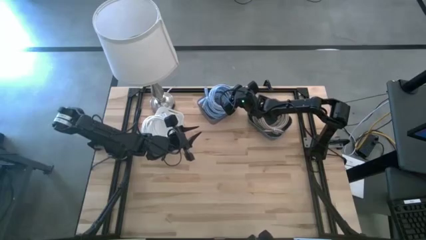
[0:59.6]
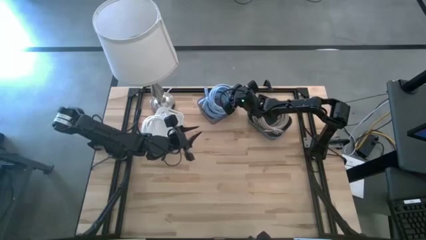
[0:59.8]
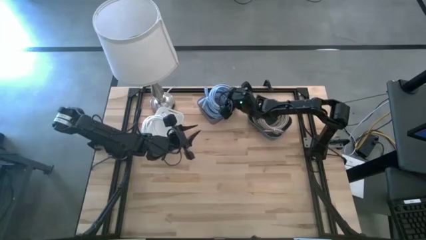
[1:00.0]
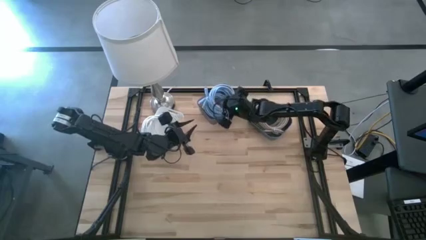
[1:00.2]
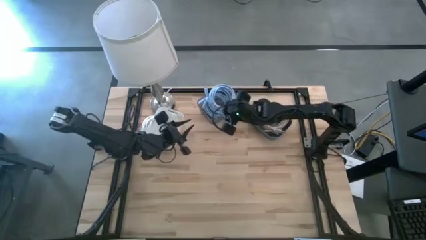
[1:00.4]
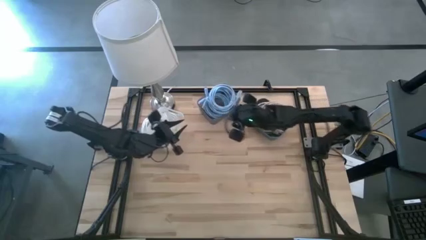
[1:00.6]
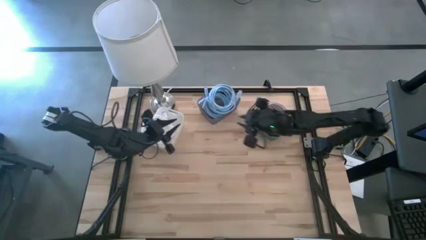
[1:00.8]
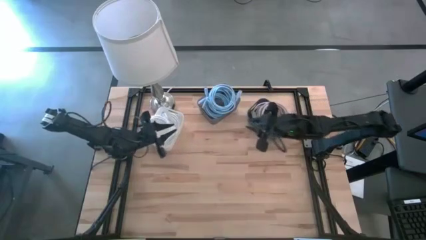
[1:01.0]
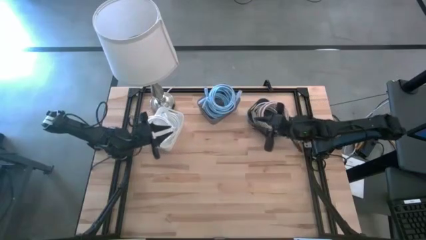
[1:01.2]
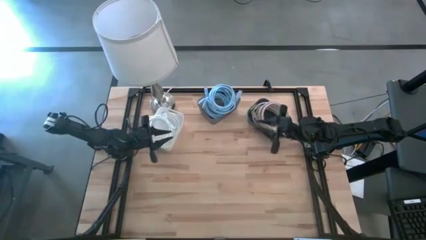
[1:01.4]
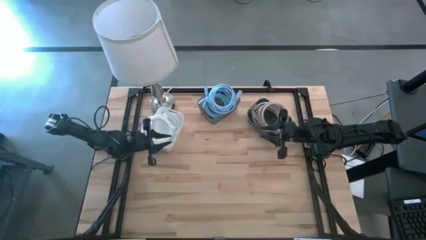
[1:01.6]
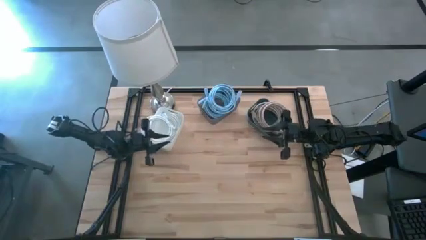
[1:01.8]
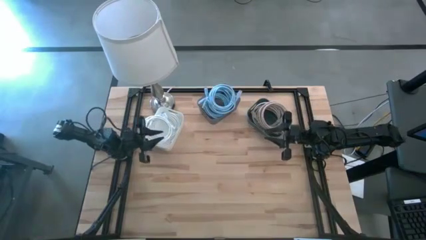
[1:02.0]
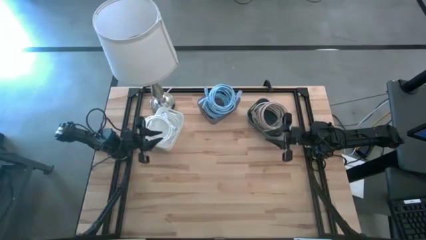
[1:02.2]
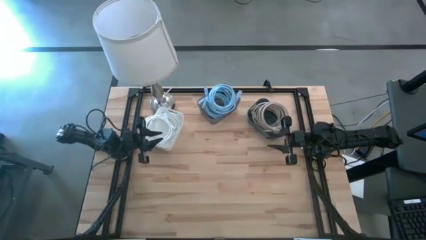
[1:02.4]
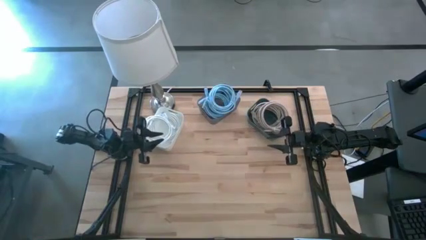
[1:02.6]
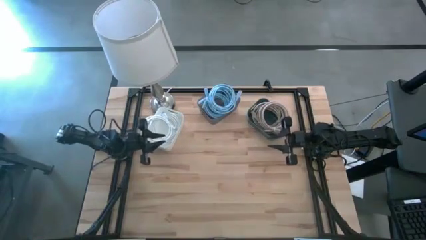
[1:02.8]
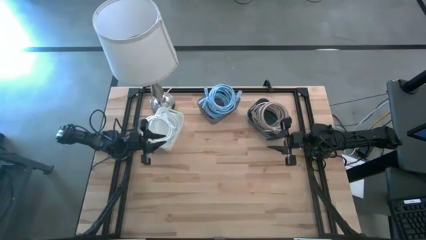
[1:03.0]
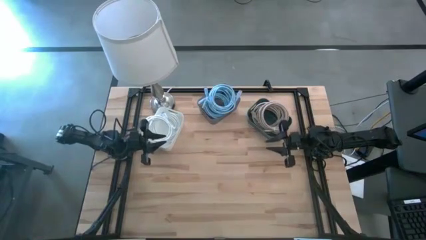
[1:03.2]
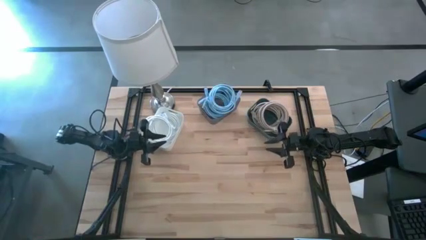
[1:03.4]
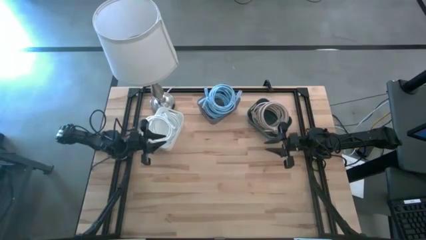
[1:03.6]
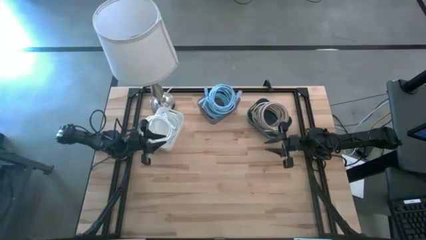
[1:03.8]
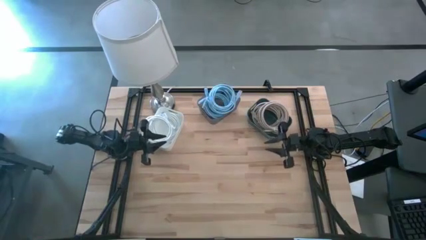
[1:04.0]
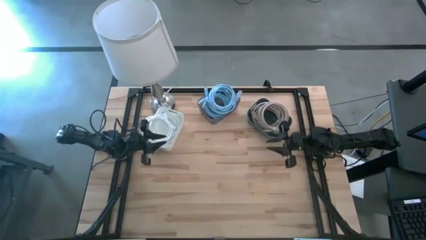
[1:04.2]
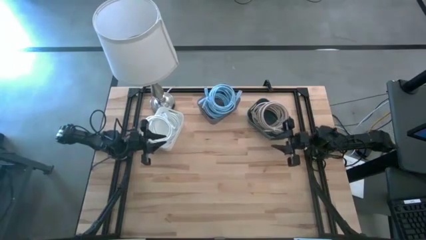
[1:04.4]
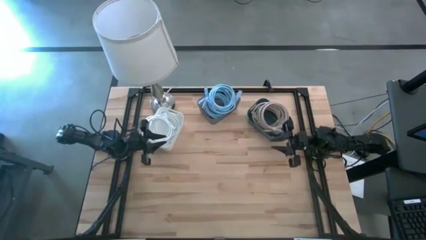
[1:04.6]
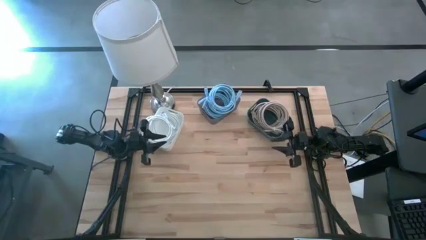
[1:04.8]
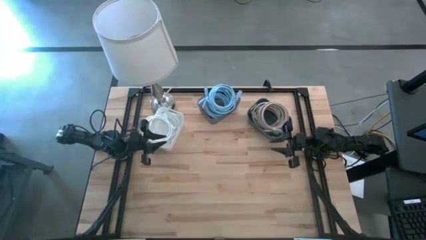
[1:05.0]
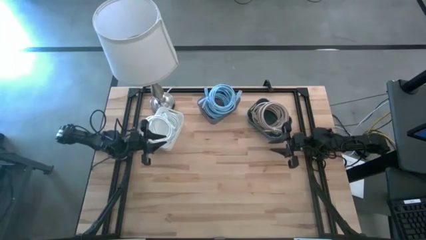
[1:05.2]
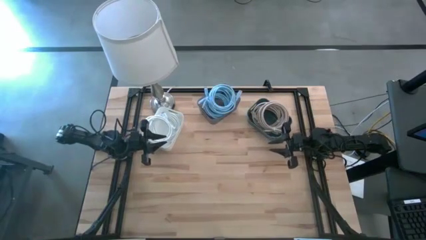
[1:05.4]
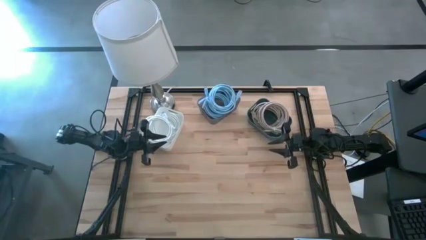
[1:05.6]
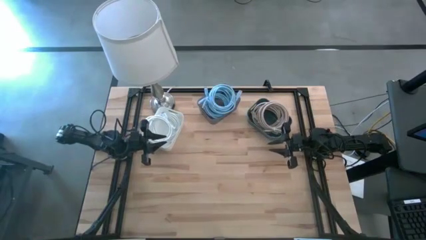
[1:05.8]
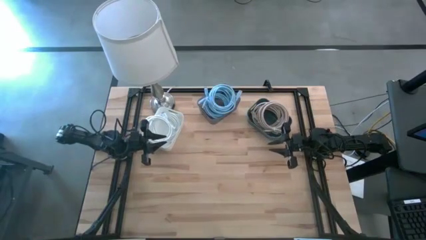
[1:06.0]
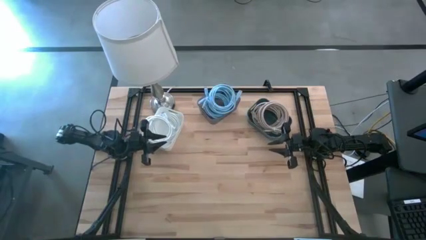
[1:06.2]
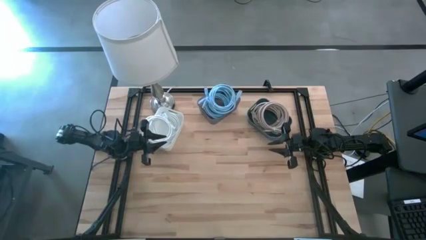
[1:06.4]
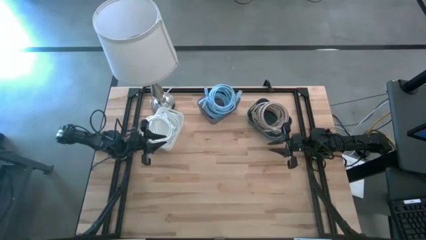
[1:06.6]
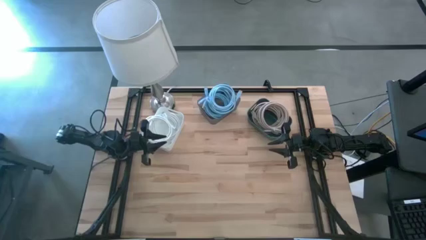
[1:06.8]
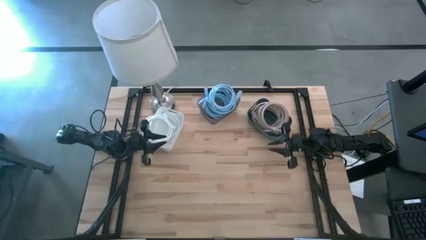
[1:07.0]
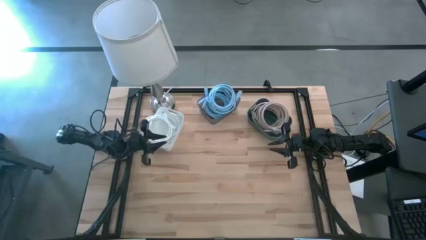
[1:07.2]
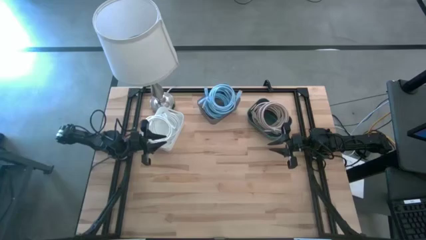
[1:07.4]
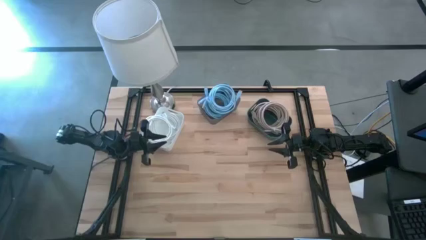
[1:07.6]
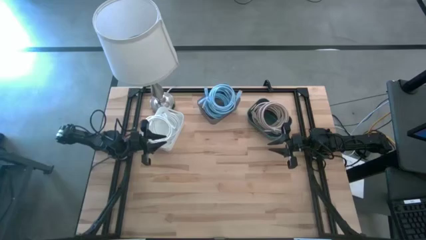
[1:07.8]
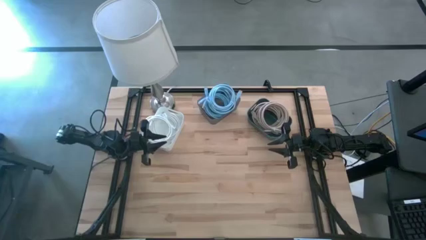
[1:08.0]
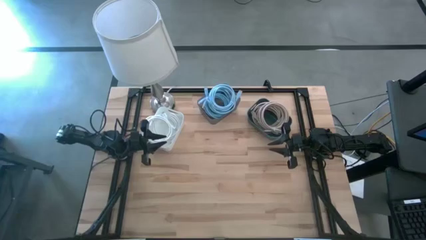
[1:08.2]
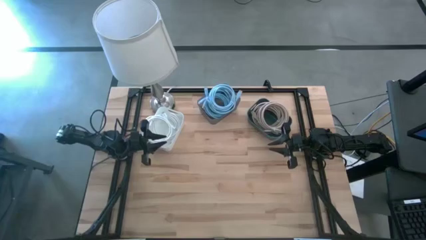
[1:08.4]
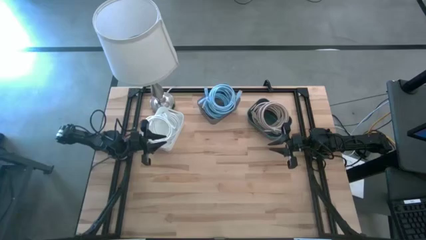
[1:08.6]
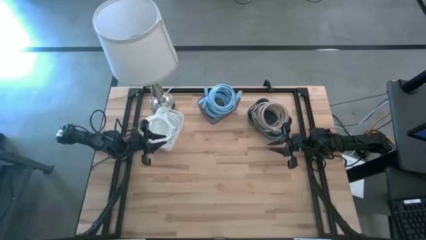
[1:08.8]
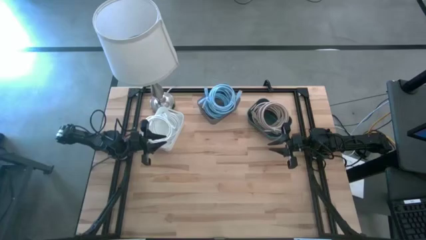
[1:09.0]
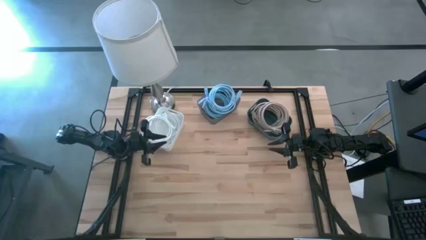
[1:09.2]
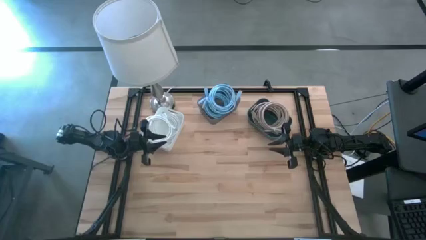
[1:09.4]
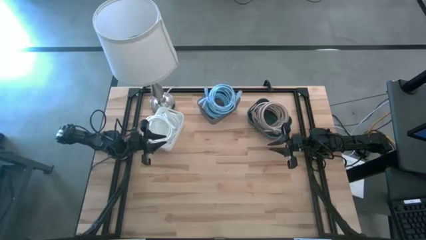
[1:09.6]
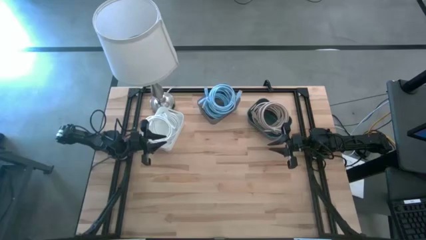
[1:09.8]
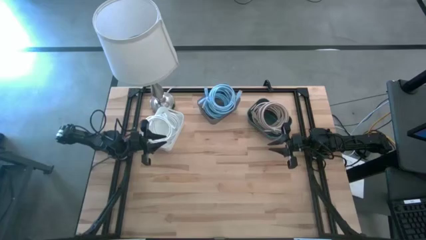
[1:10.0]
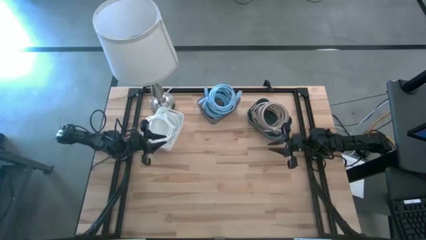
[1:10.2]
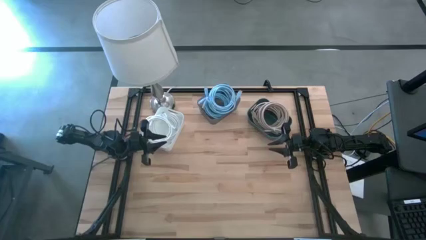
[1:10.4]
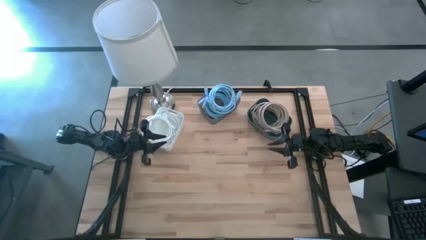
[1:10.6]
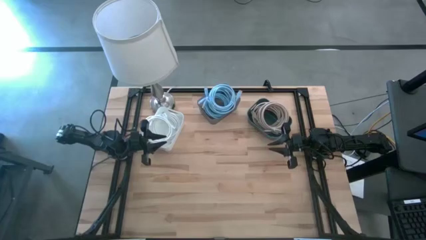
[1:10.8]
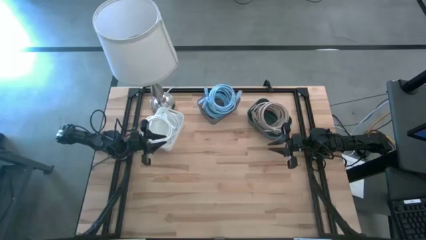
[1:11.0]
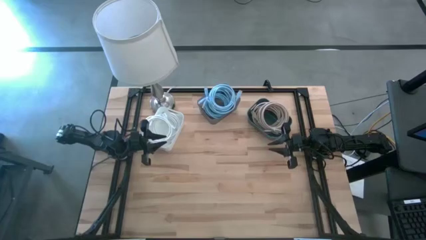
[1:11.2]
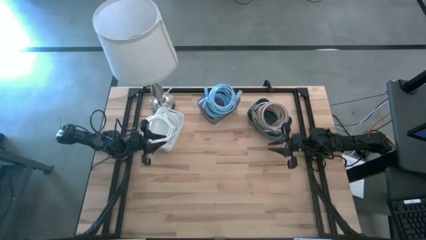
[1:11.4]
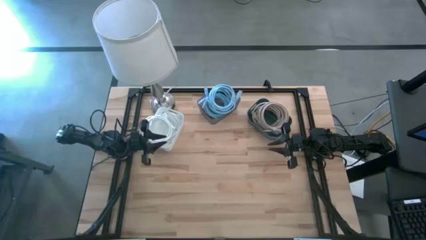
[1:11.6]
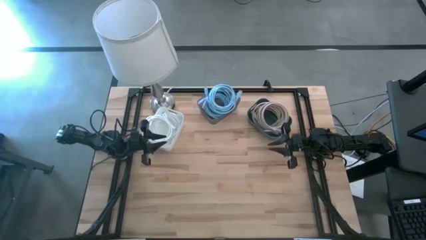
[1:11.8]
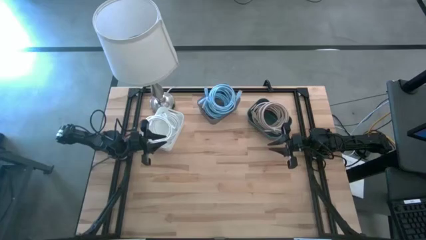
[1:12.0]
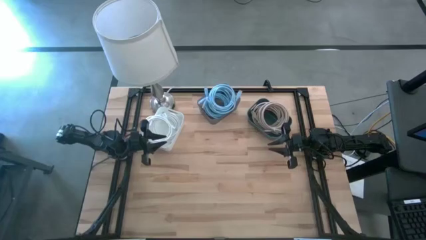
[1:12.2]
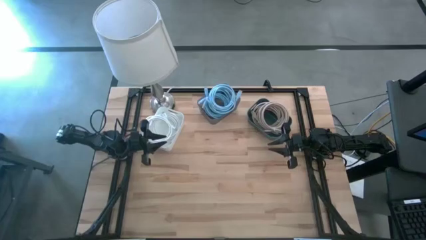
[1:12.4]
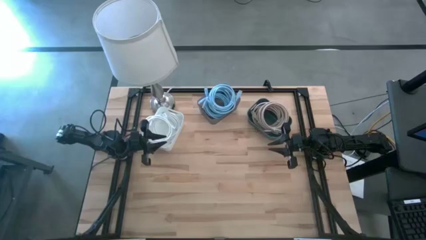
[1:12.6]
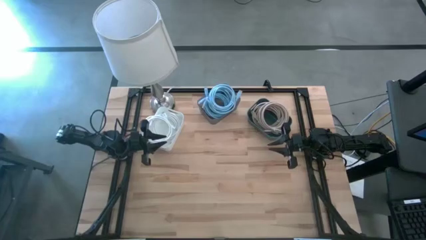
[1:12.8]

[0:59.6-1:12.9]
Task: Sort HDMI cables
Return to Home Position
